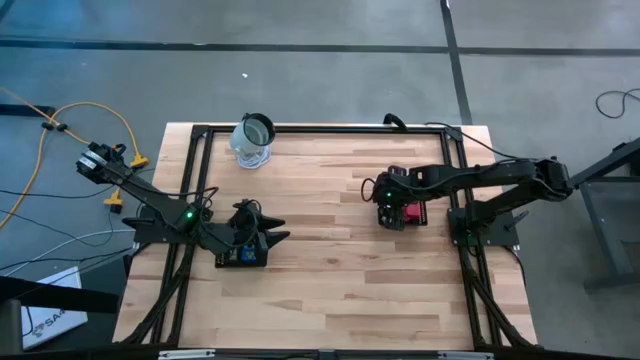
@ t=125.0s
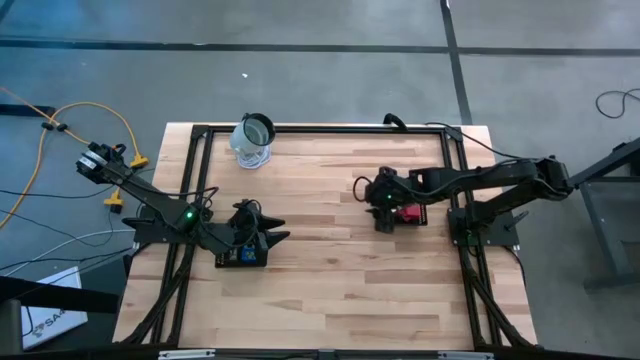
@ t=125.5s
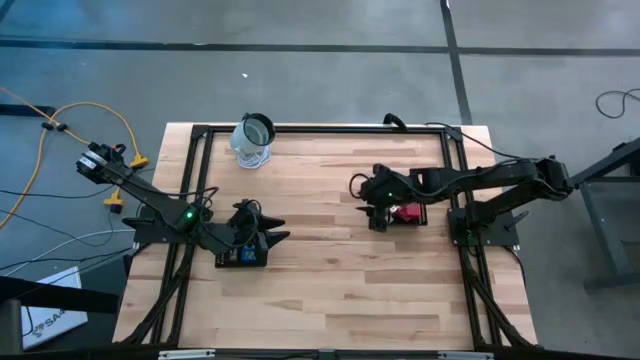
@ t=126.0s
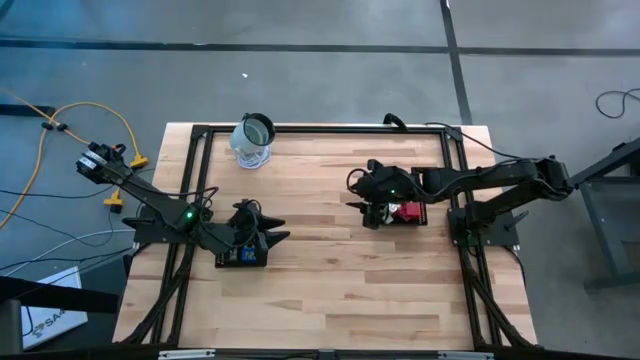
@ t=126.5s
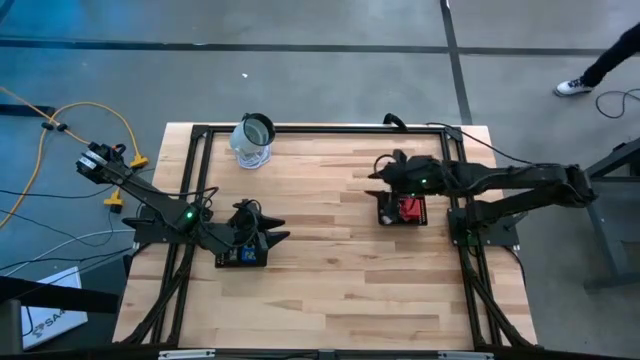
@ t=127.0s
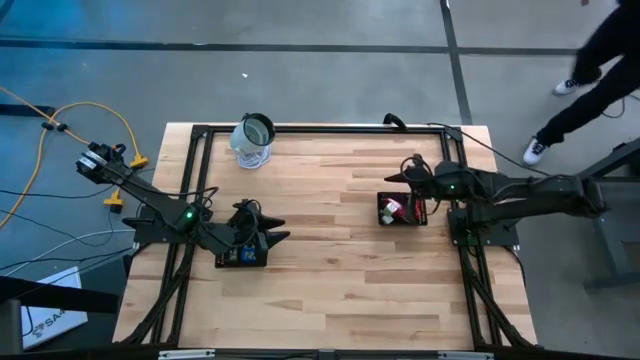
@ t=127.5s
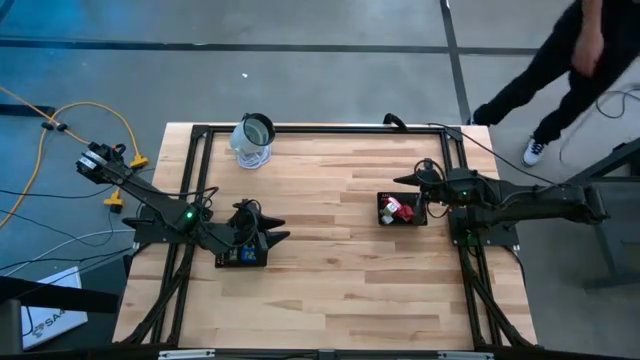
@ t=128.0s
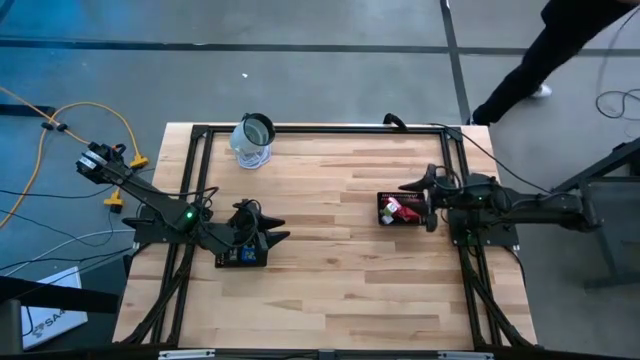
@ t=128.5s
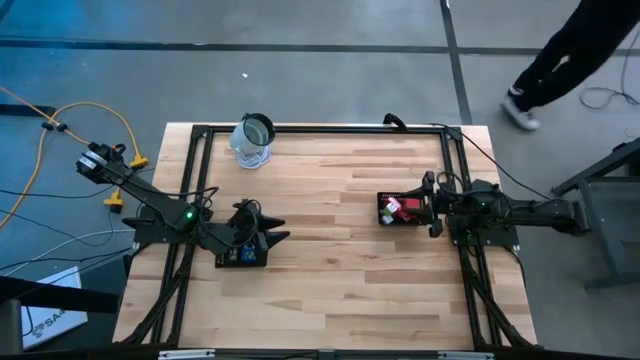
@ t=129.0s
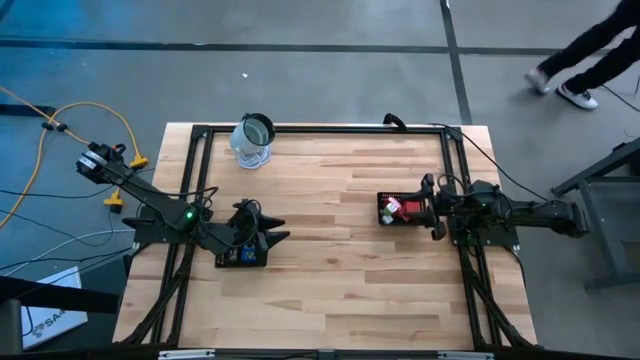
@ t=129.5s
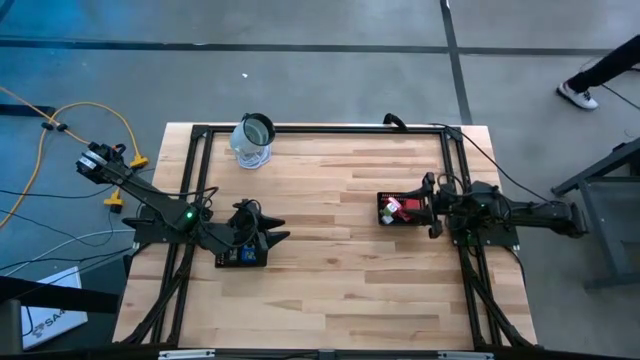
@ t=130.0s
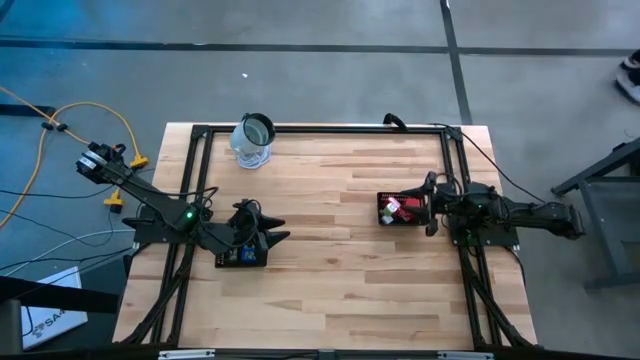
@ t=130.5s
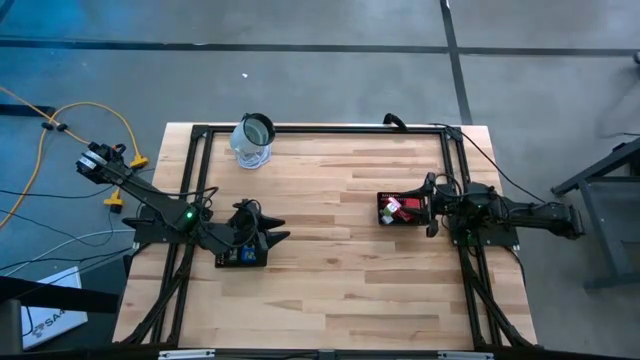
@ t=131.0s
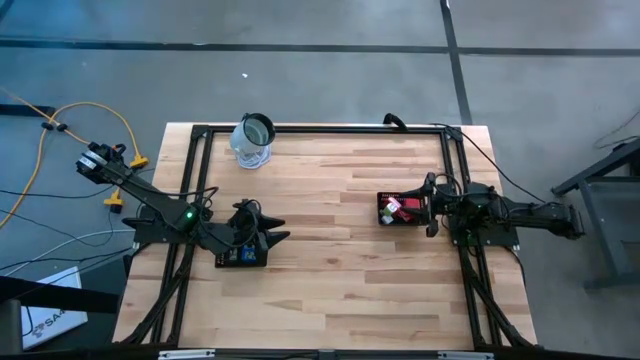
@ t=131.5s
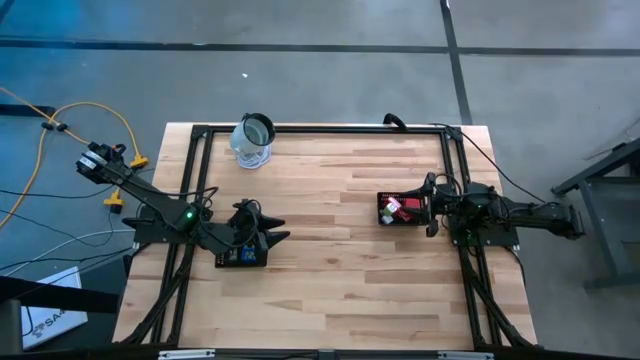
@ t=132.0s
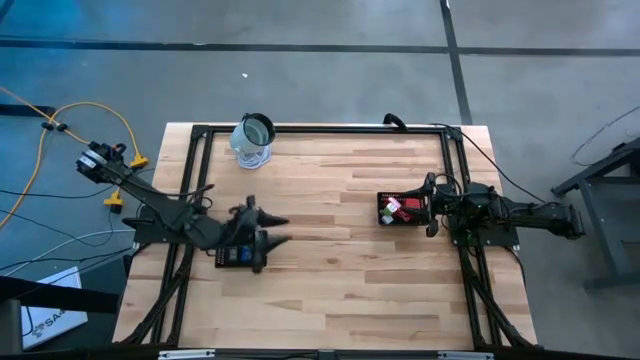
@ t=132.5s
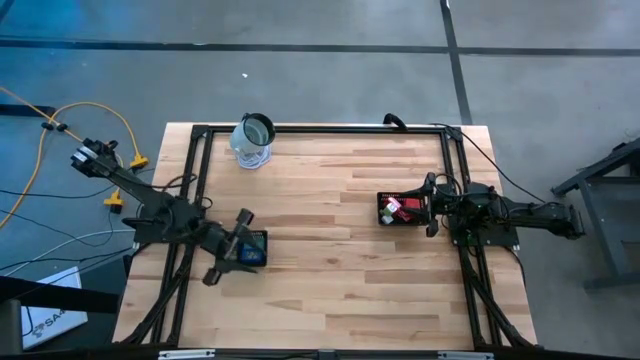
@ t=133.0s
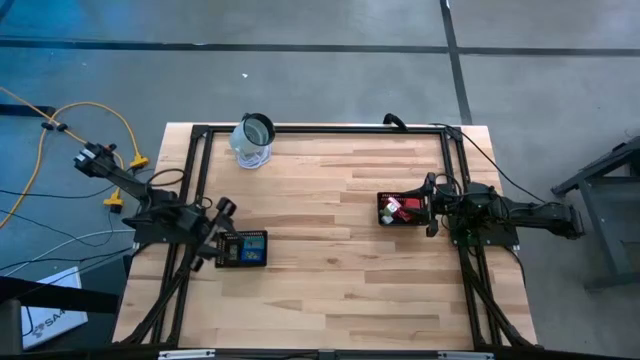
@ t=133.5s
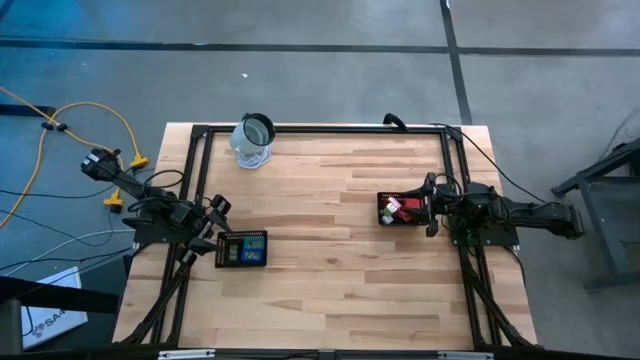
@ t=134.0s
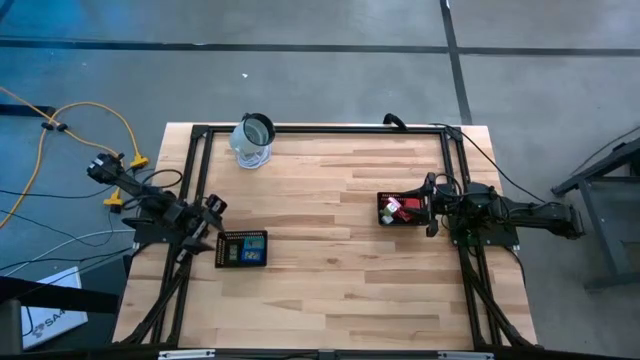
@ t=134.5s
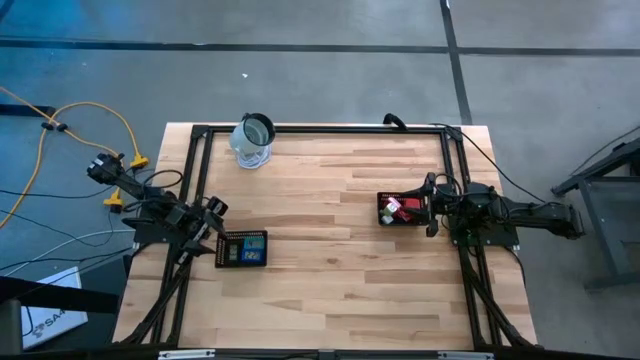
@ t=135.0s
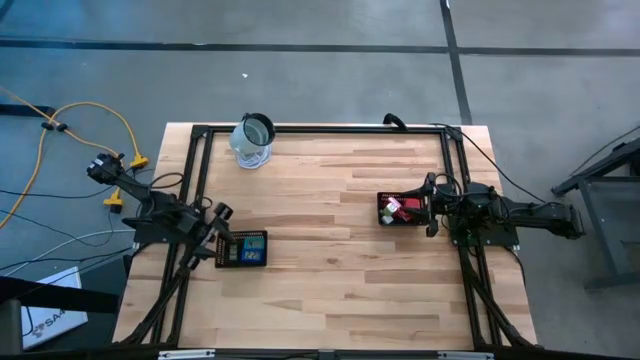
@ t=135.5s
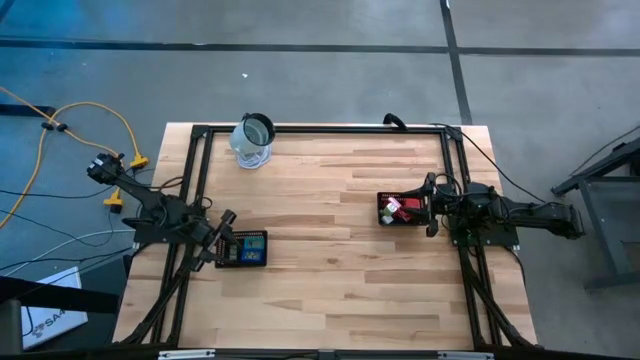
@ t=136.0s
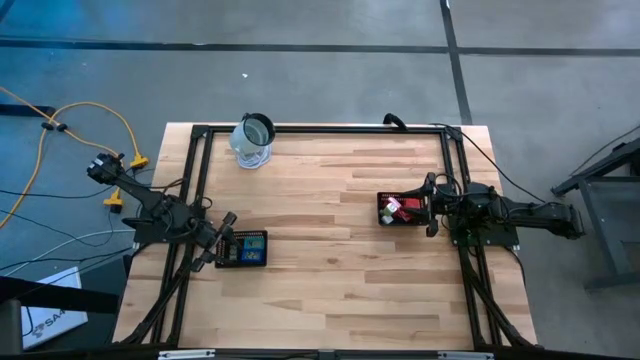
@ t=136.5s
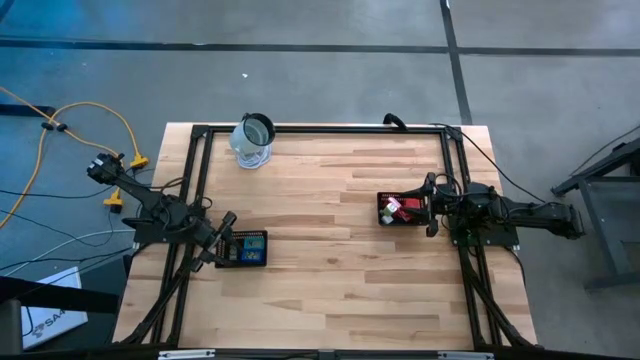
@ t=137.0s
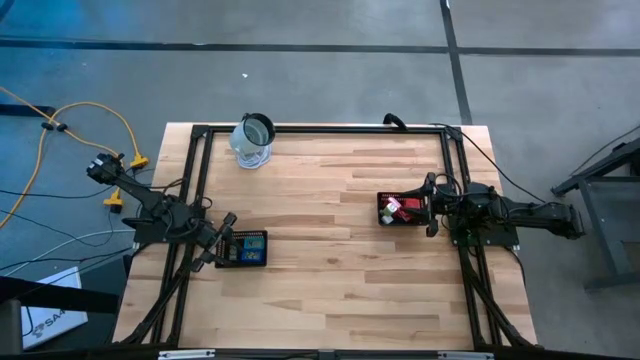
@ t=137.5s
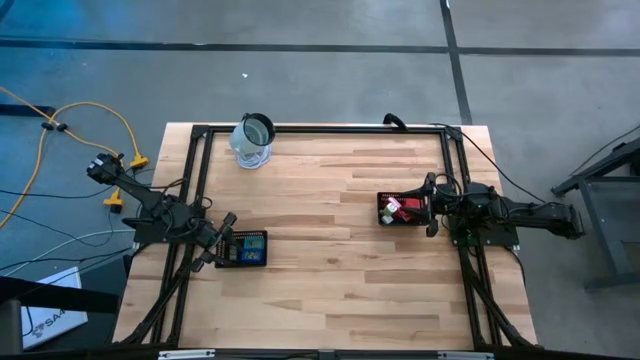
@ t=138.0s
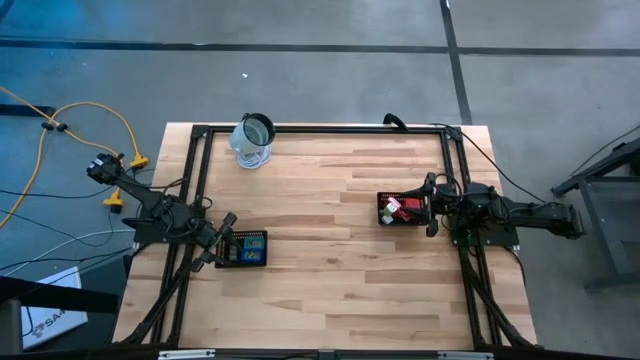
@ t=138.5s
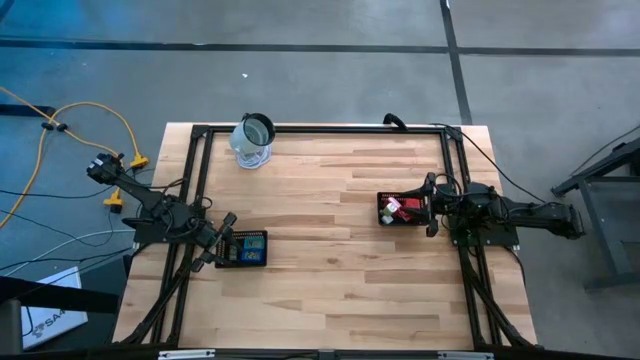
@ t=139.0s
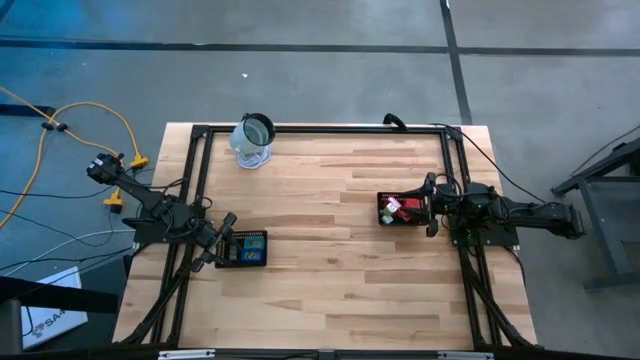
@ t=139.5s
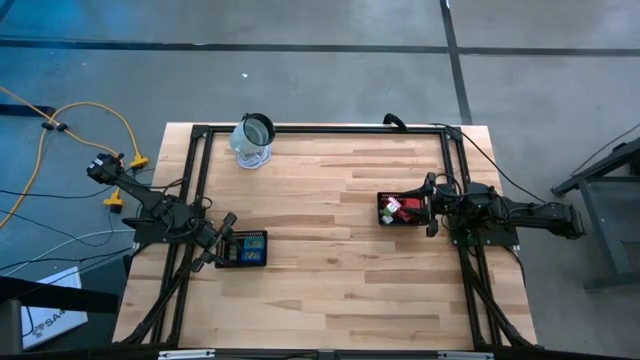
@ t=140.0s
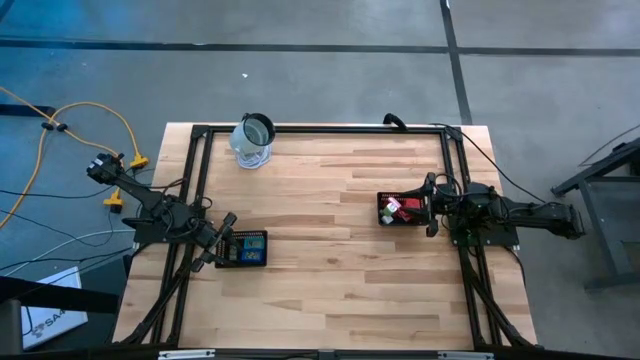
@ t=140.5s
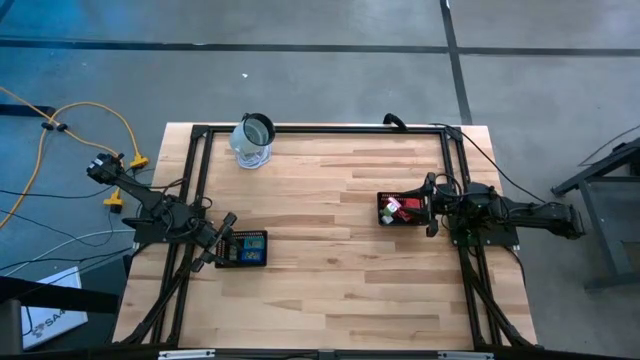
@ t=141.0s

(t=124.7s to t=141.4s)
Task: Pick & Place Office items
Return to Home Position

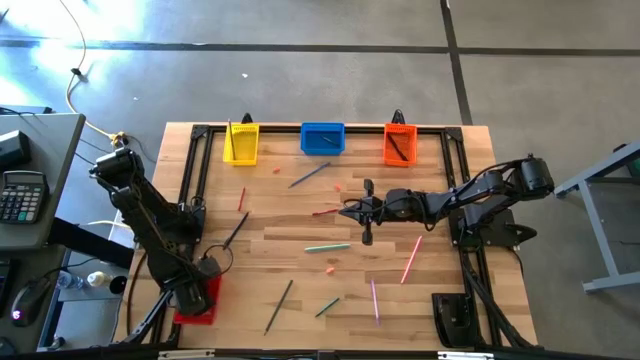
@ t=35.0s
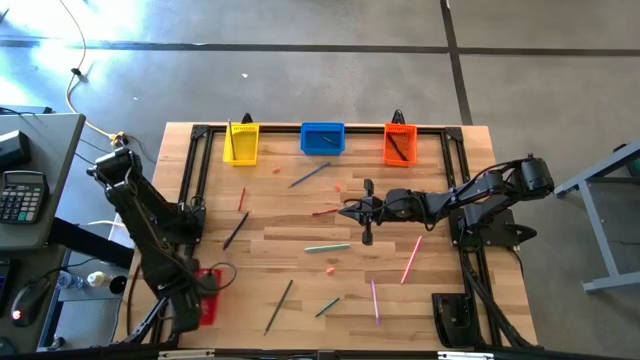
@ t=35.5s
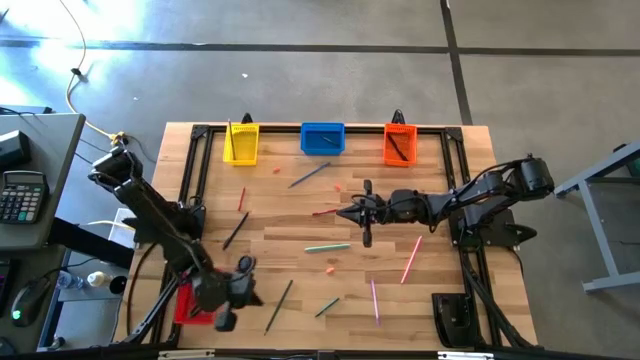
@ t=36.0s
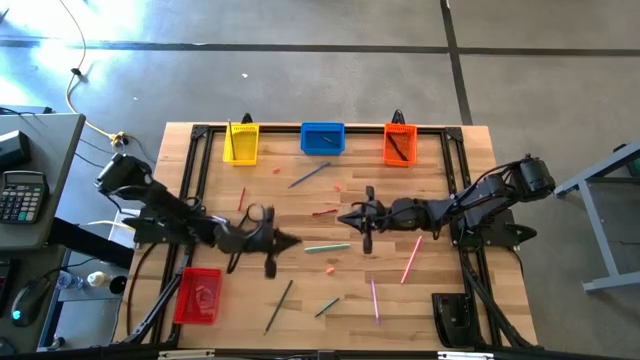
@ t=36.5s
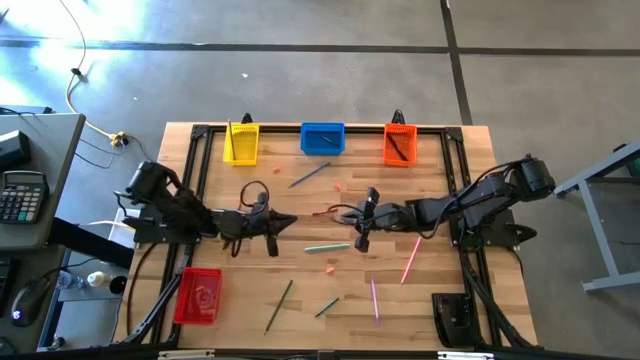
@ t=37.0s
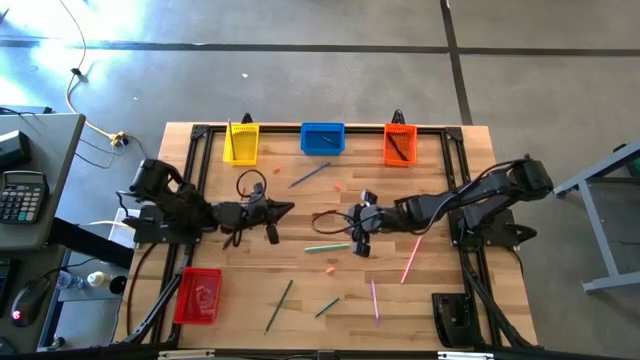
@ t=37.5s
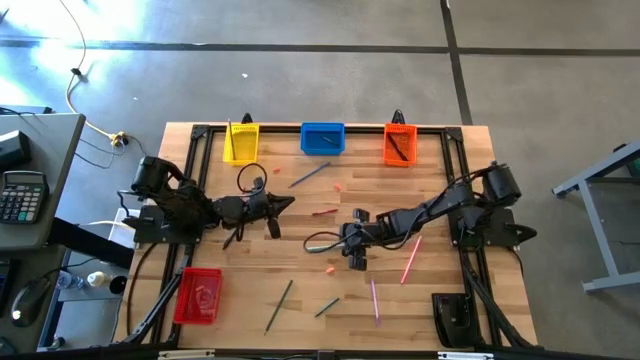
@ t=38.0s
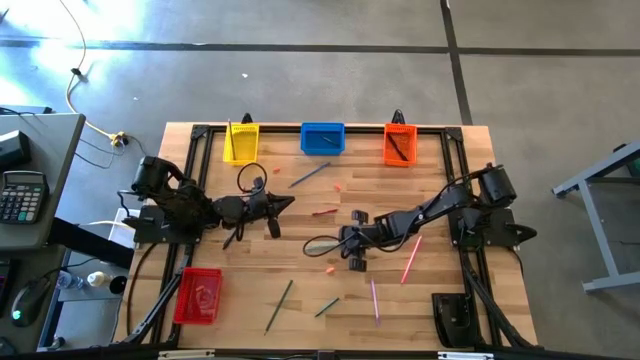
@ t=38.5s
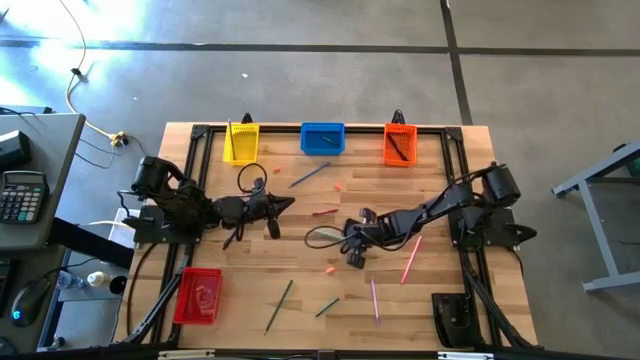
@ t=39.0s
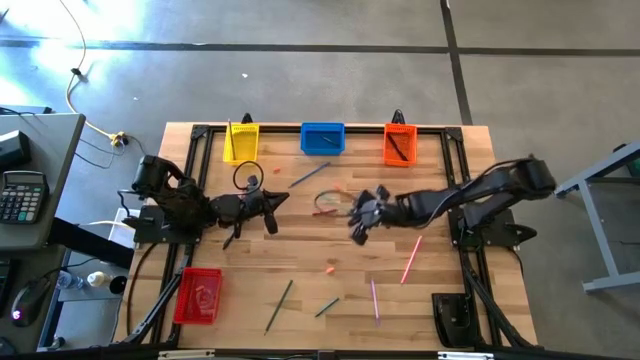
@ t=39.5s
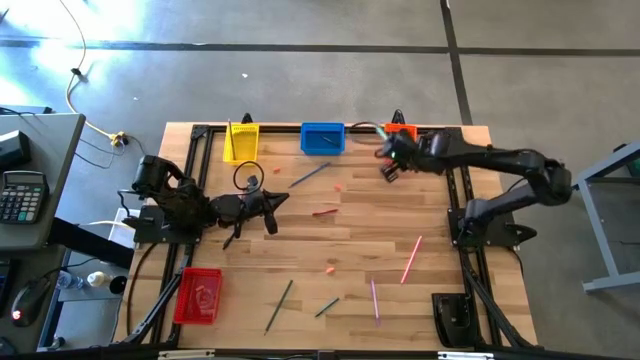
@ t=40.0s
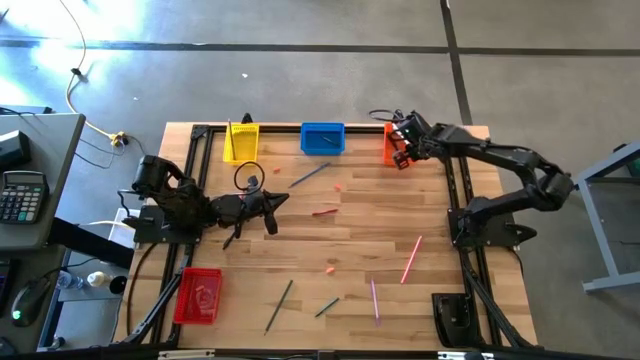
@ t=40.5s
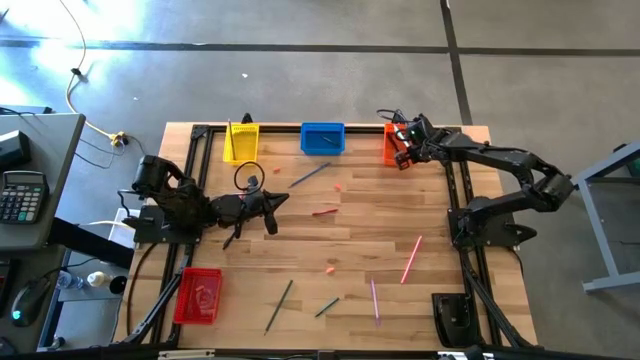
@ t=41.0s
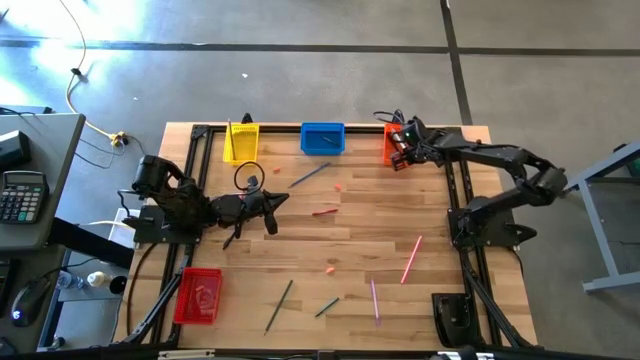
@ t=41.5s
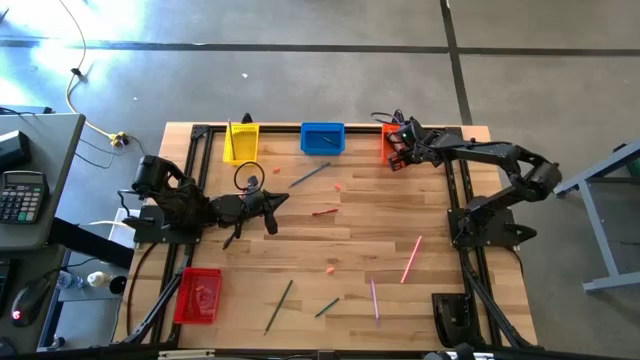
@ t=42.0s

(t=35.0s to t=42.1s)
Task: Sort crayons/erasers/pens/pencils in bins
Put the light blue pen into the orange bin
